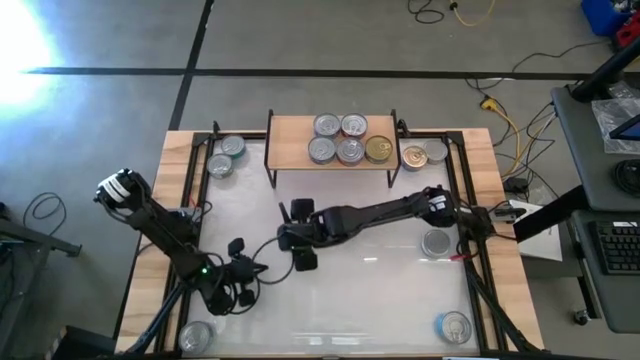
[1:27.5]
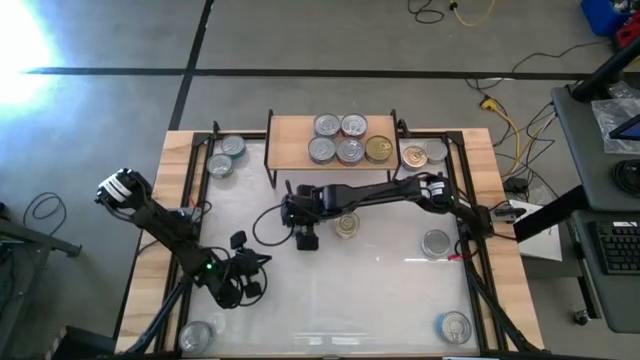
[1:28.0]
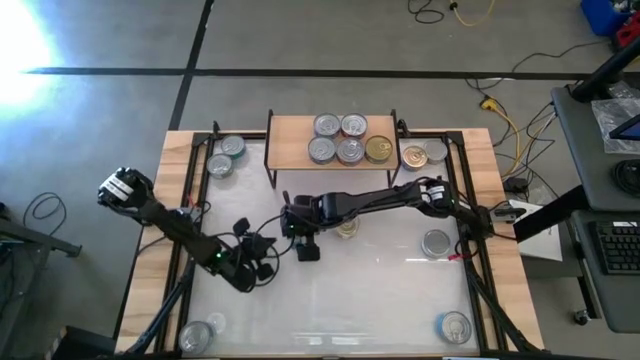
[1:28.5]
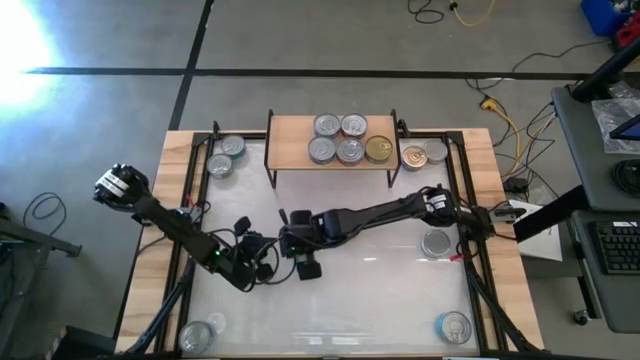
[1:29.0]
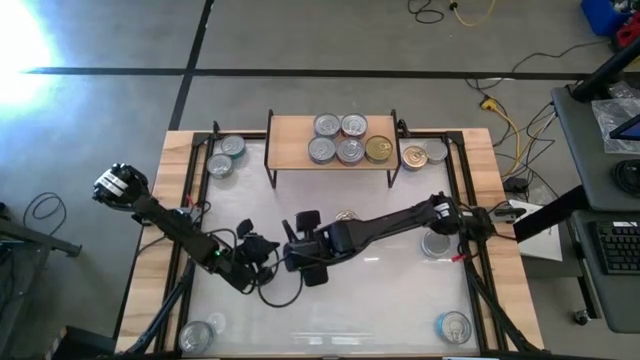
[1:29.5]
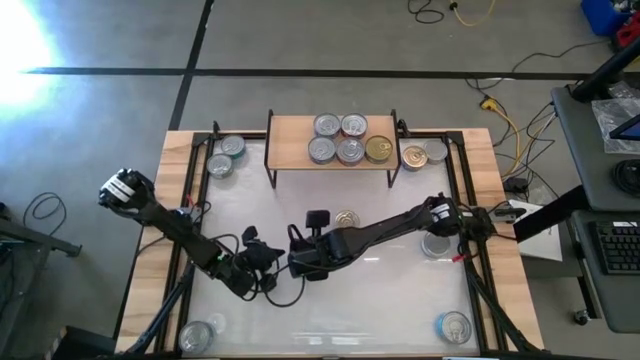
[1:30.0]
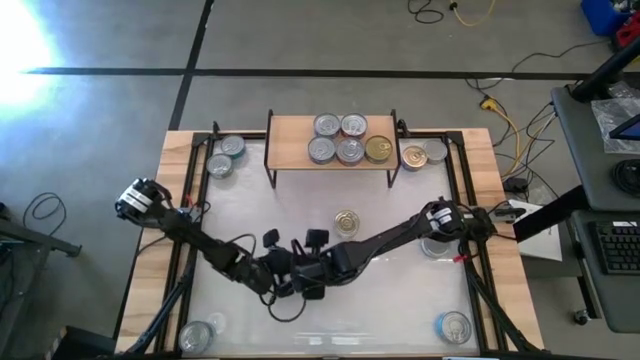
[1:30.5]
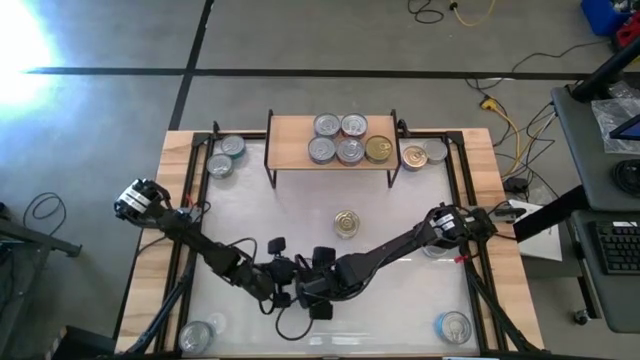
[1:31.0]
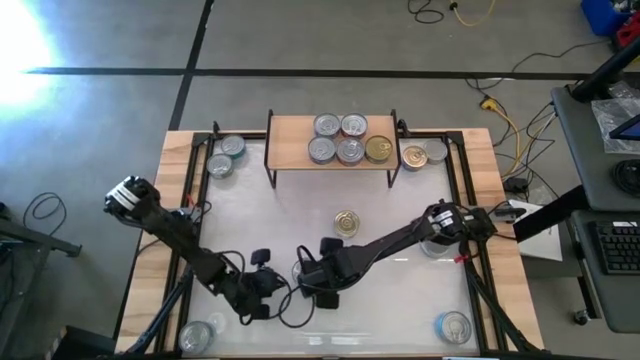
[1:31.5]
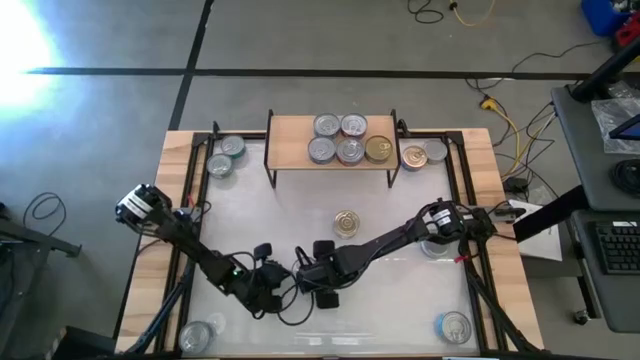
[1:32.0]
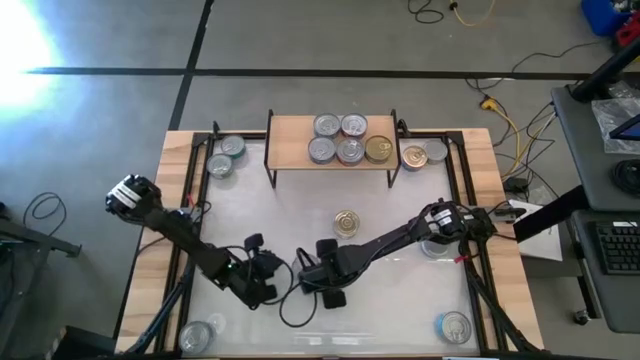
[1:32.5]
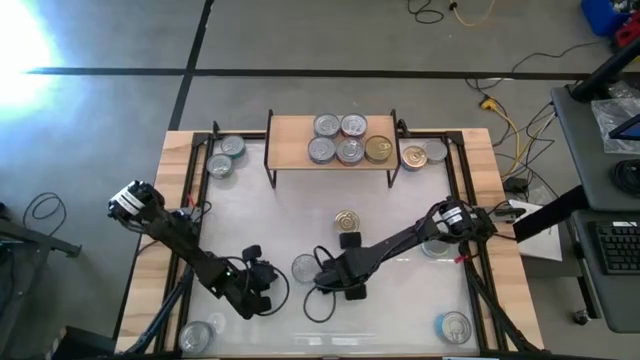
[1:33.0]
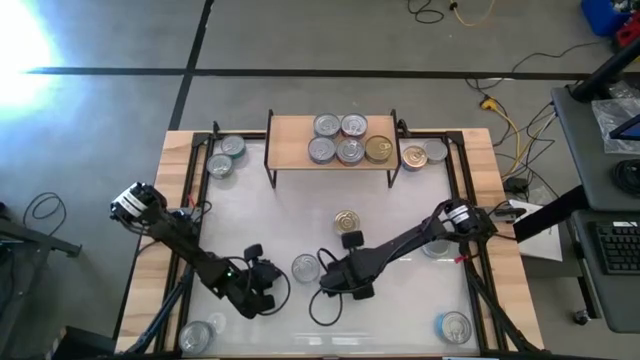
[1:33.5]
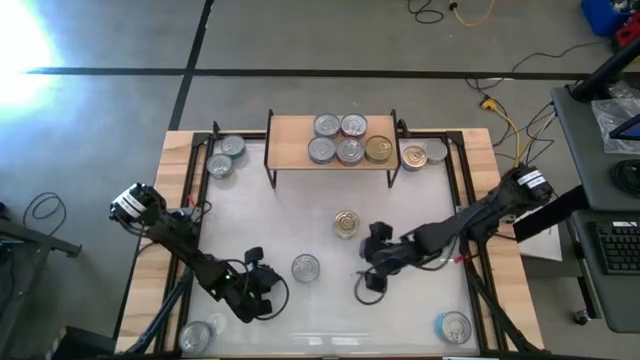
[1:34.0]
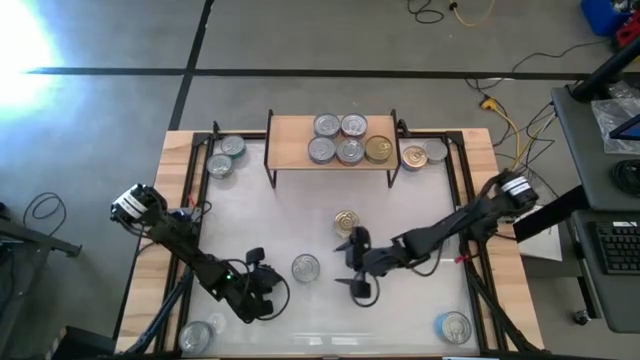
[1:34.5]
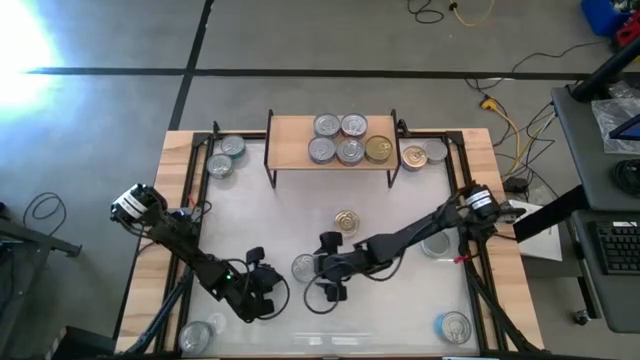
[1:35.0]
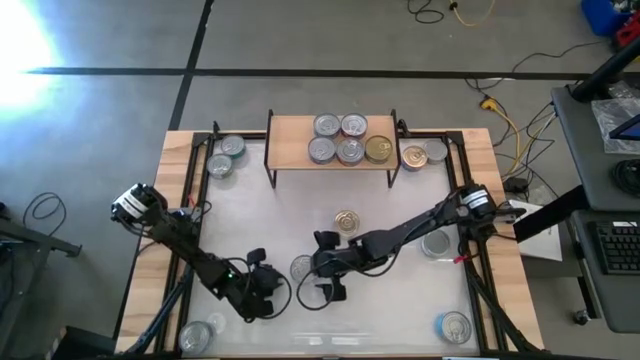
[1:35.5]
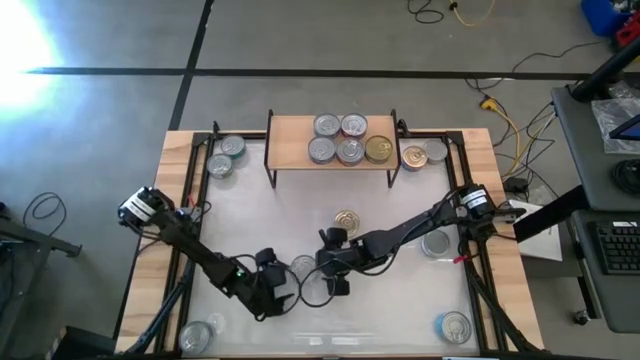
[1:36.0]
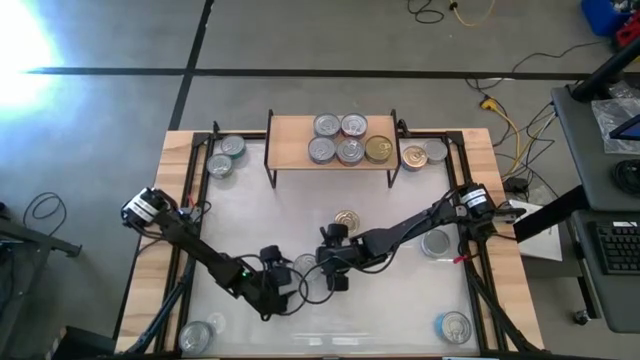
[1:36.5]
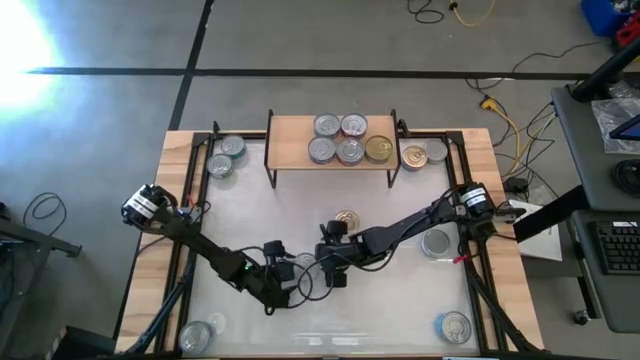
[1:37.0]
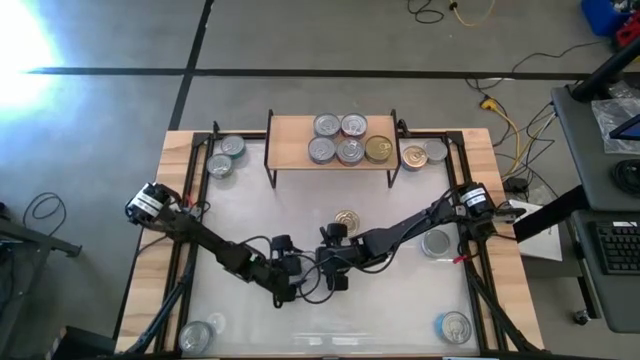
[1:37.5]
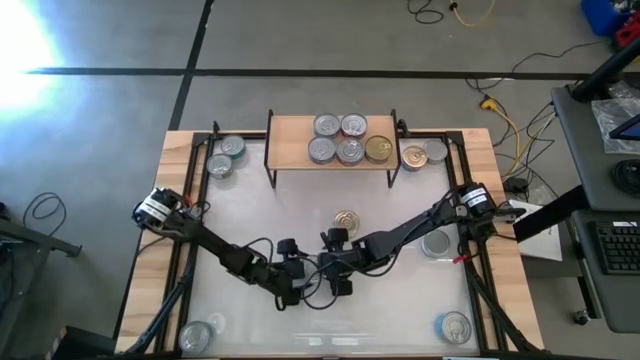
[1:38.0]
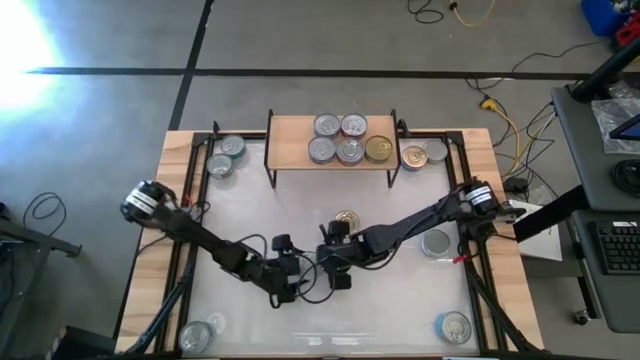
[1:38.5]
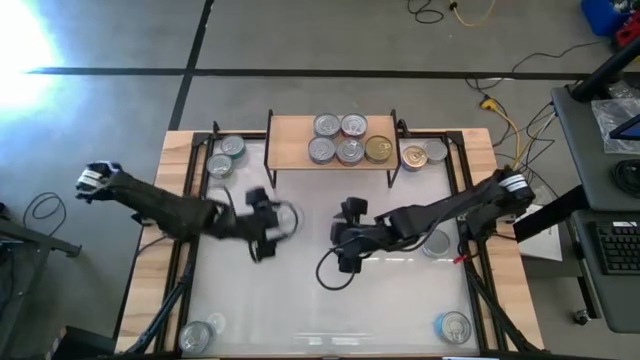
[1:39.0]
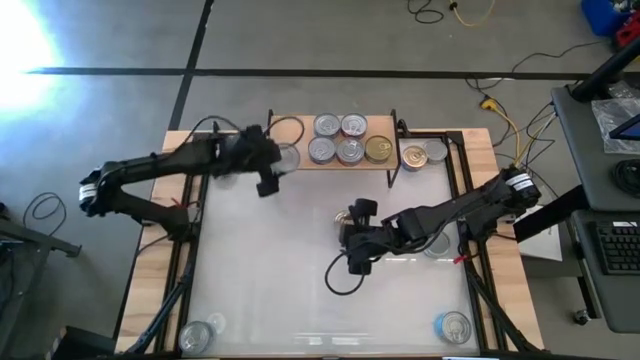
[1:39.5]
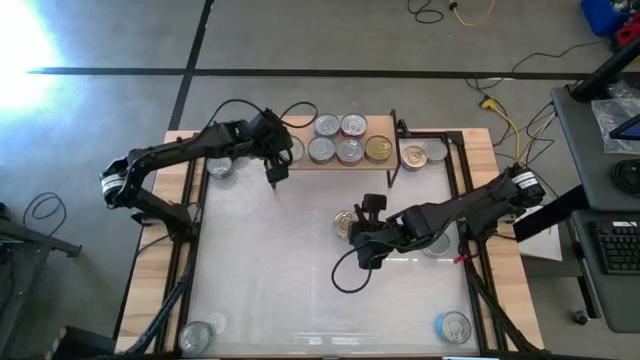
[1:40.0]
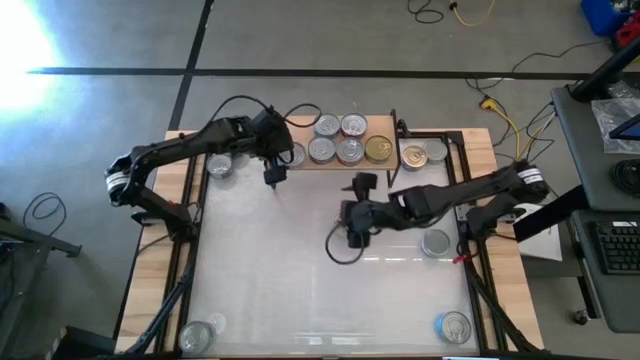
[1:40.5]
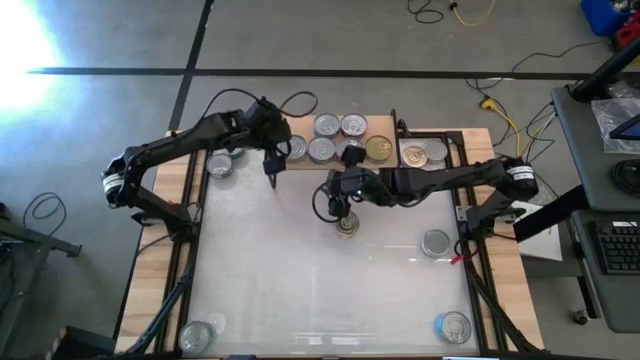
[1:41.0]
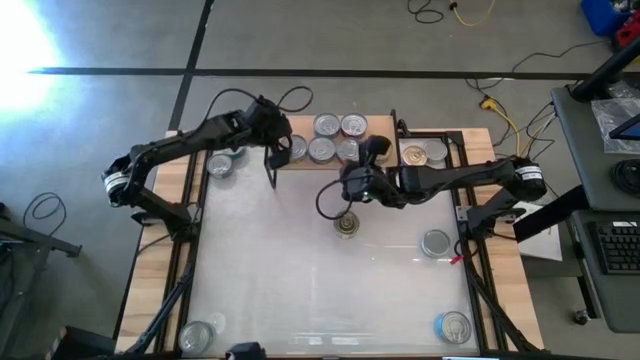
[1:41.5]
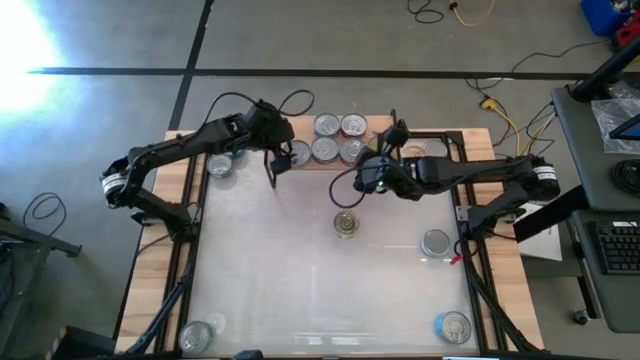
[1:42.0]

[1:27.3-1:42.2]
Task: Stack canned seafood by type on shelf
Put the bottom middle yellow-blue tuna can on the shelf

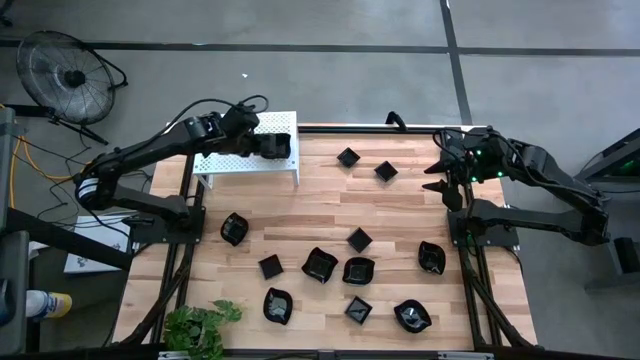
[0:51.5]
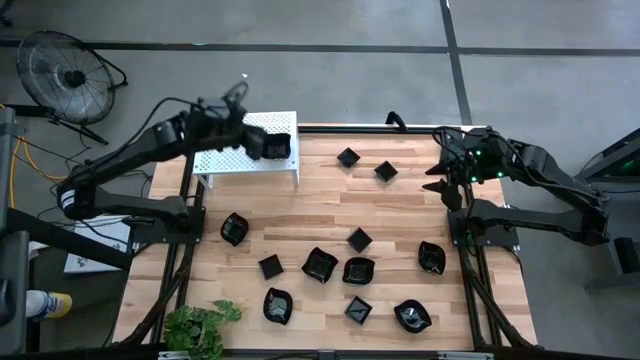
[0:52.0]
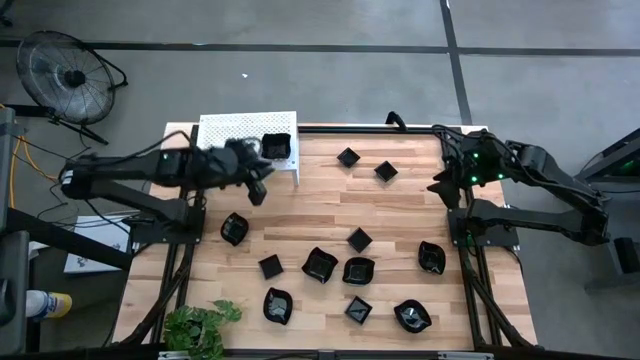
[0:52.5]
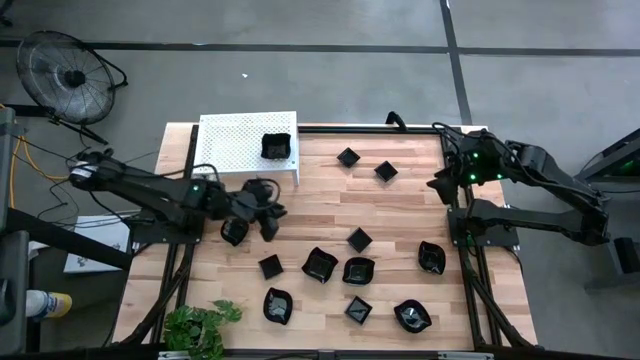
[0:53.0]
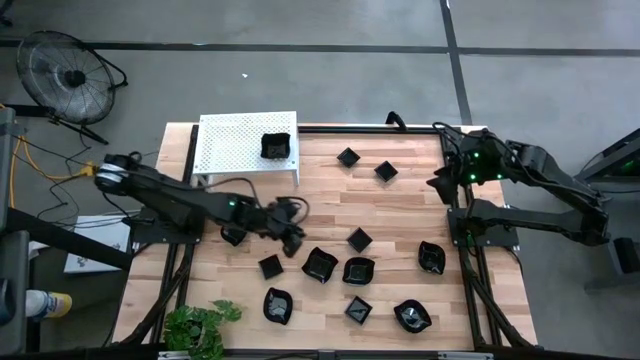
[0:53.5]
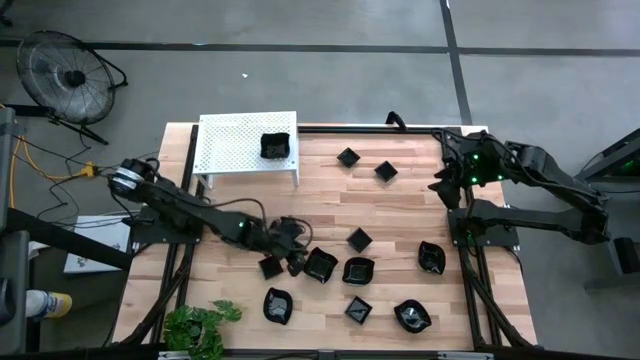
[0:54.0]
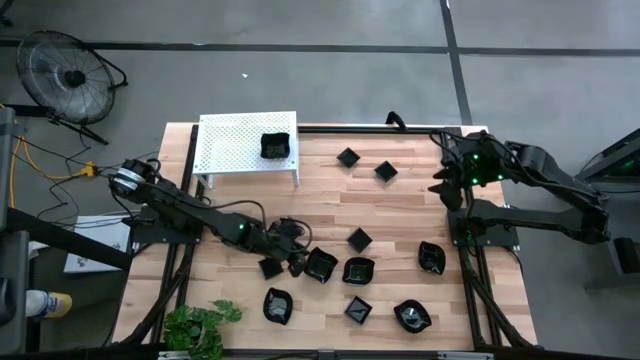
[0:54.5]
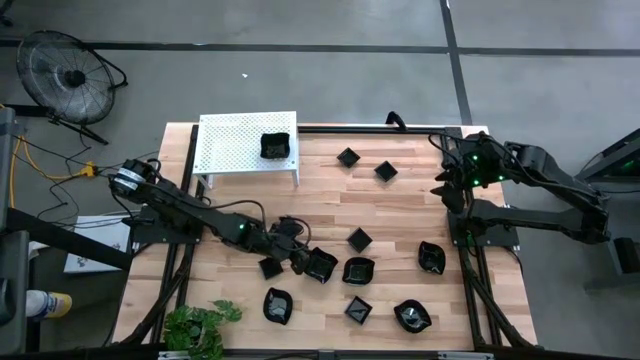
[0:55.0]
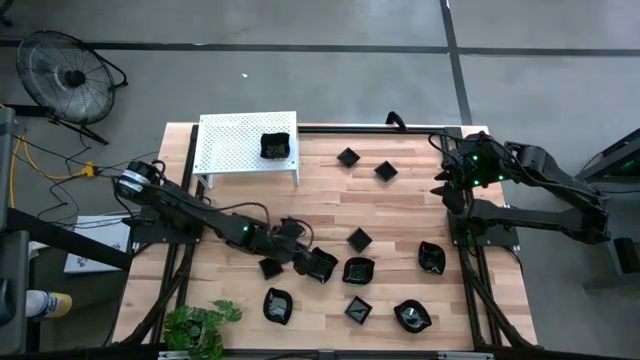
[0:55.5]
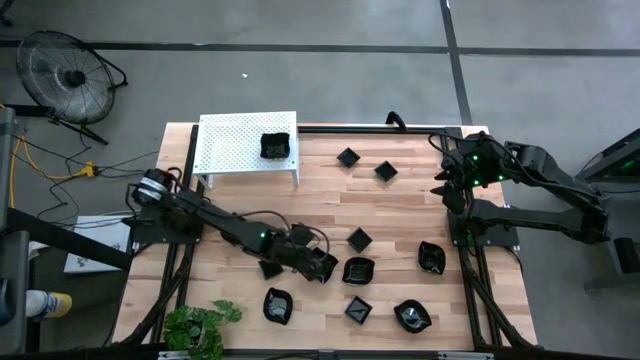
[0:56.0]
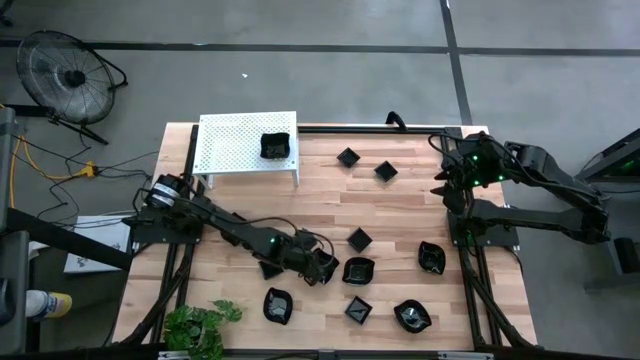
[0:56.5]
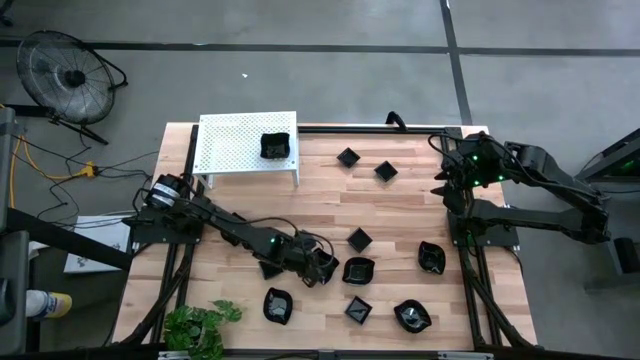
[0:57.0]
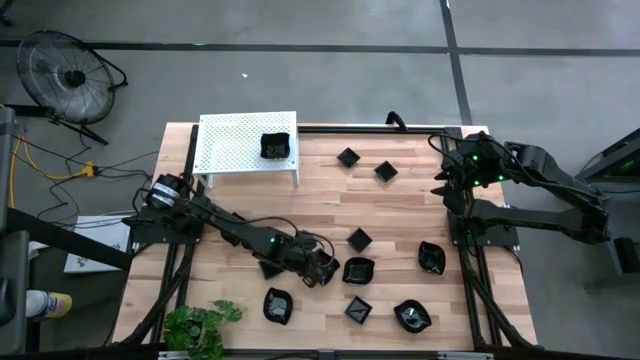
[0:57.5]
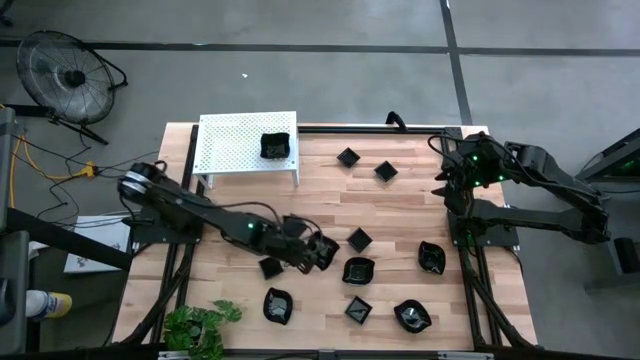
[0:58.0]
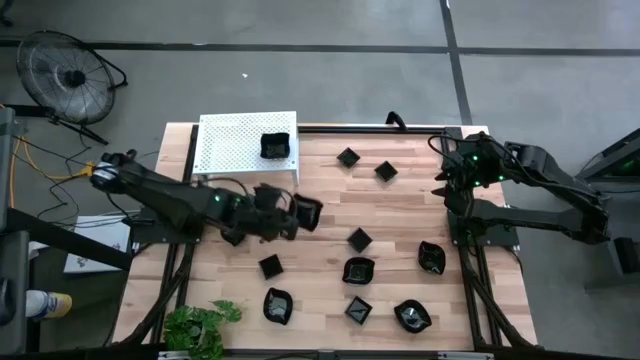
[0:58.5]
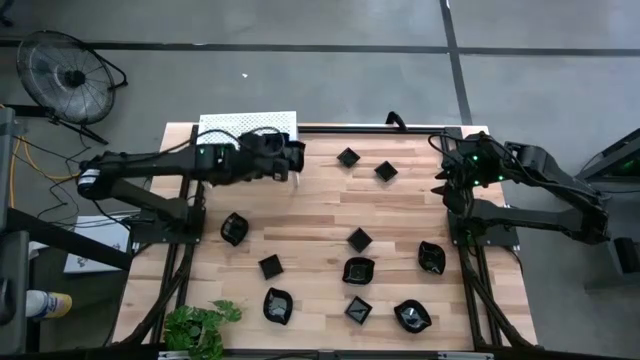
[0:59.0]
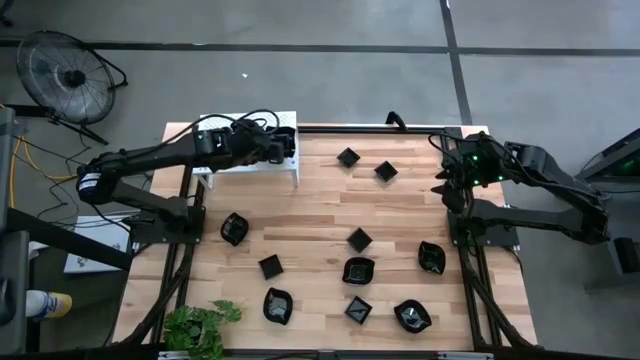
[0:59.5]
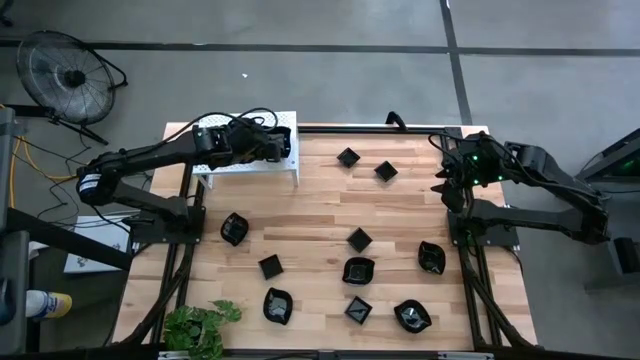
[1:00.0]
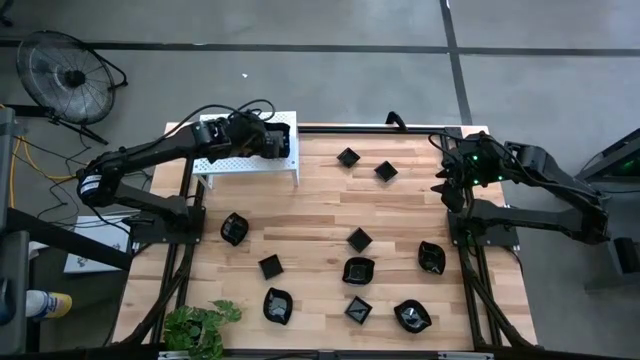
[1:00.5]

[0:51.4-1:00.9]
Task: Pick & Place Mini shaped plates
Stack the black distorted square plate on top of the black distorted square plate on the shelf
